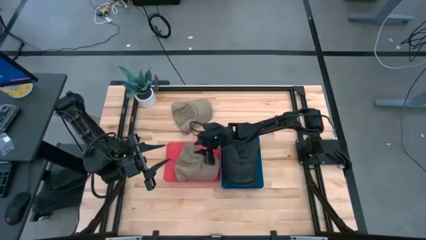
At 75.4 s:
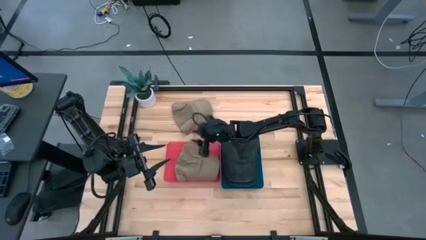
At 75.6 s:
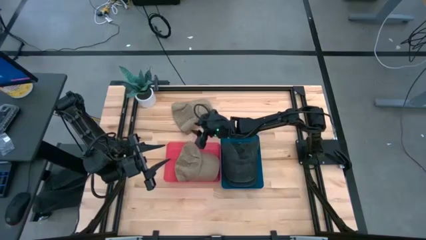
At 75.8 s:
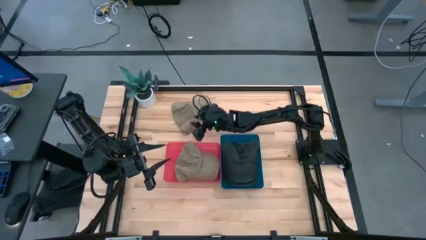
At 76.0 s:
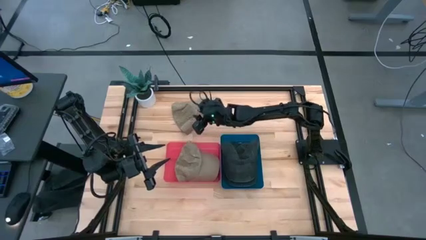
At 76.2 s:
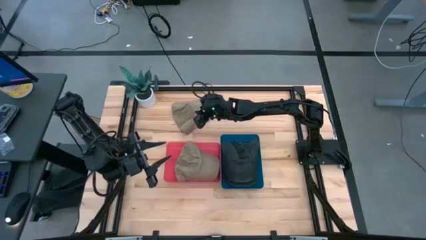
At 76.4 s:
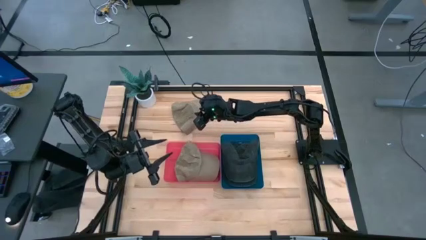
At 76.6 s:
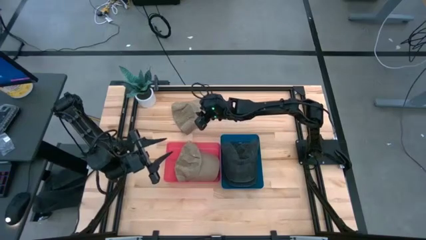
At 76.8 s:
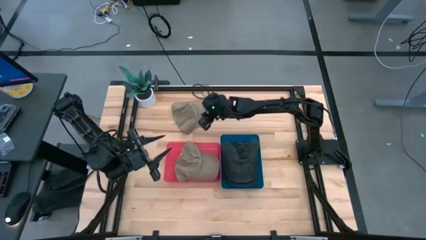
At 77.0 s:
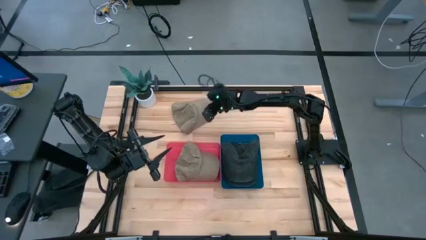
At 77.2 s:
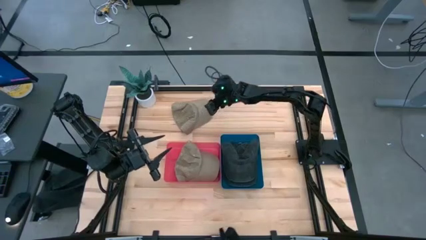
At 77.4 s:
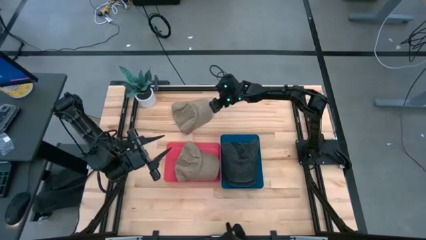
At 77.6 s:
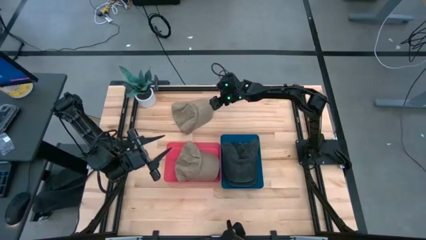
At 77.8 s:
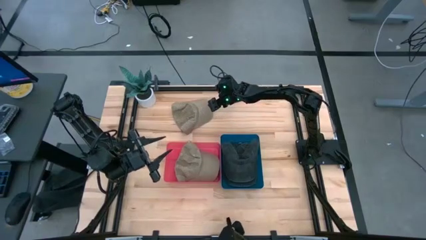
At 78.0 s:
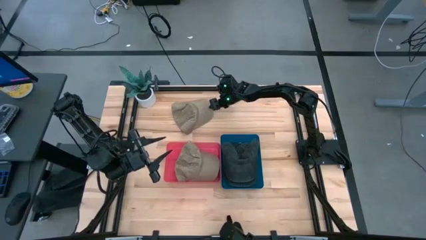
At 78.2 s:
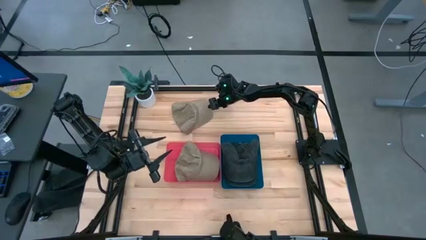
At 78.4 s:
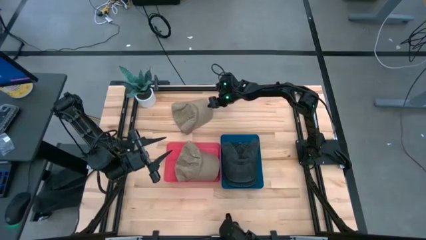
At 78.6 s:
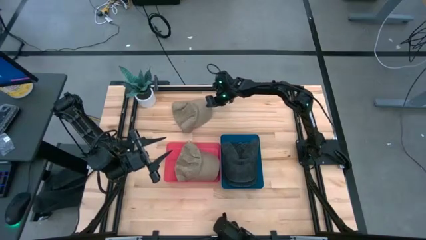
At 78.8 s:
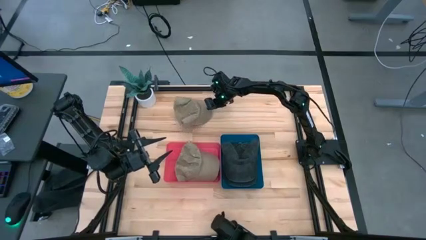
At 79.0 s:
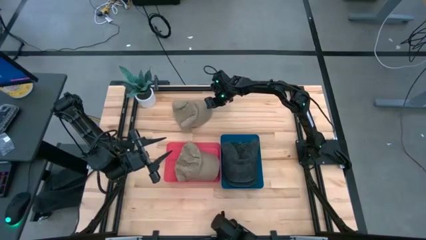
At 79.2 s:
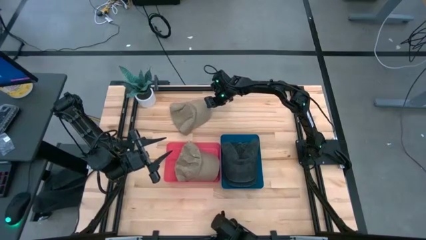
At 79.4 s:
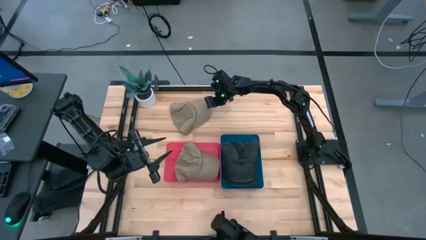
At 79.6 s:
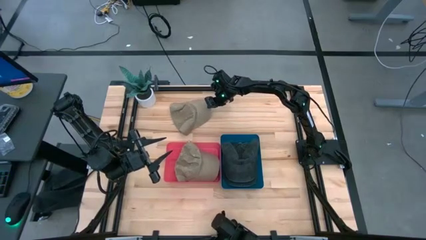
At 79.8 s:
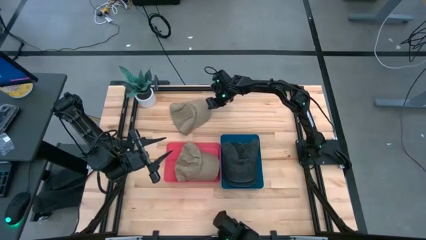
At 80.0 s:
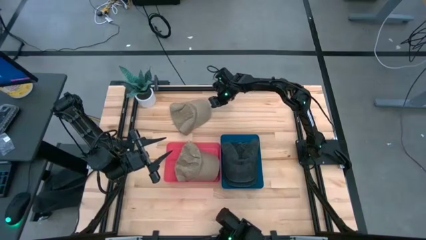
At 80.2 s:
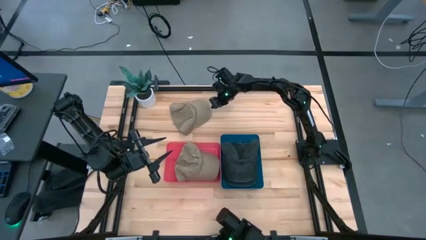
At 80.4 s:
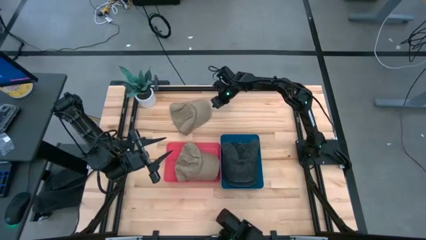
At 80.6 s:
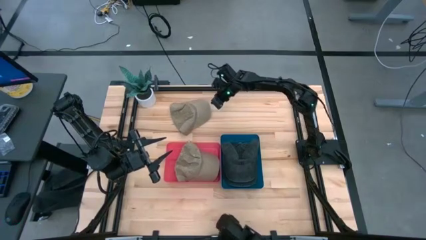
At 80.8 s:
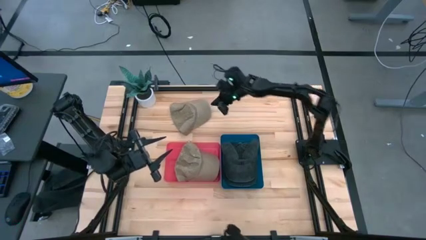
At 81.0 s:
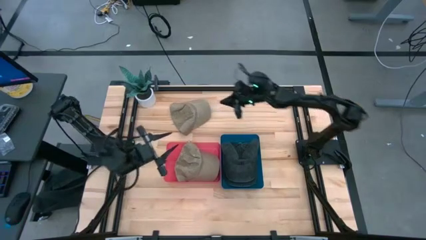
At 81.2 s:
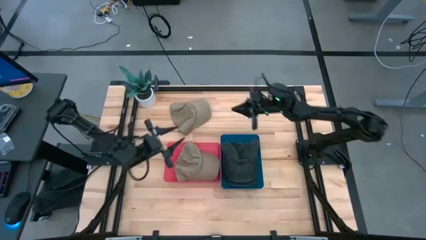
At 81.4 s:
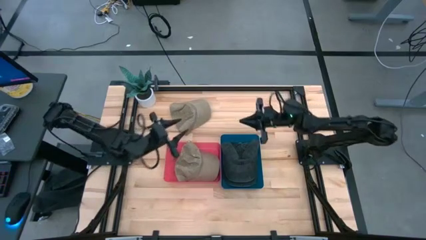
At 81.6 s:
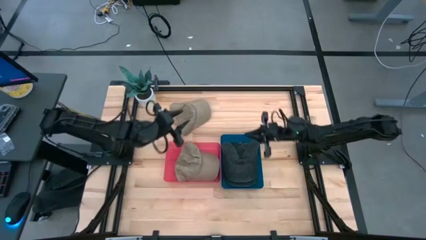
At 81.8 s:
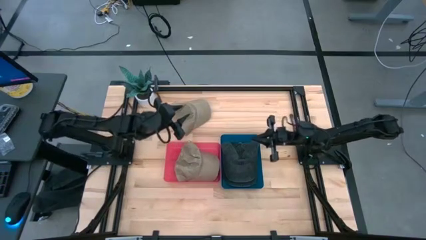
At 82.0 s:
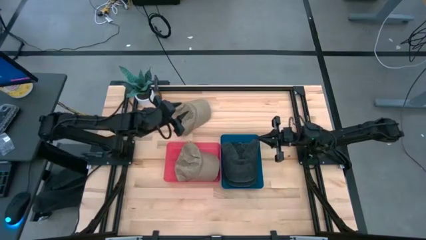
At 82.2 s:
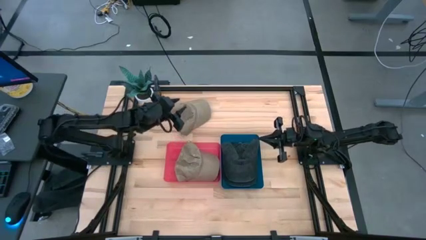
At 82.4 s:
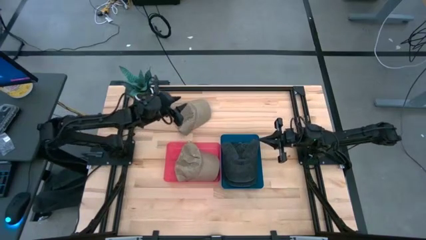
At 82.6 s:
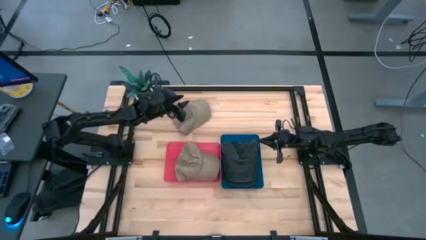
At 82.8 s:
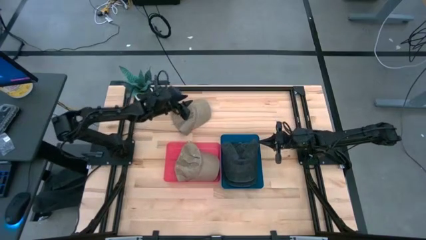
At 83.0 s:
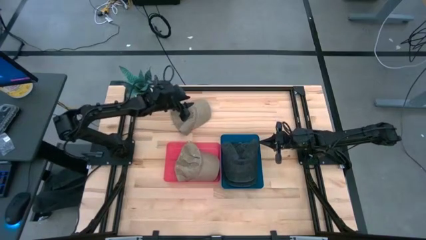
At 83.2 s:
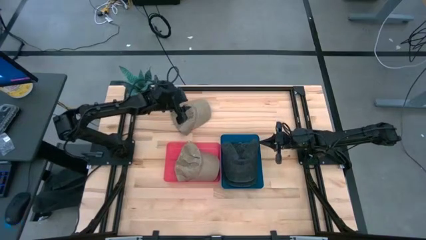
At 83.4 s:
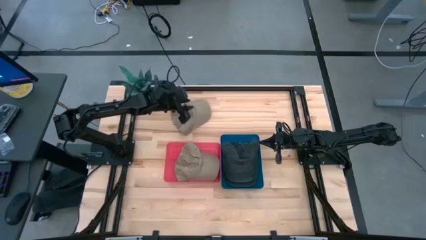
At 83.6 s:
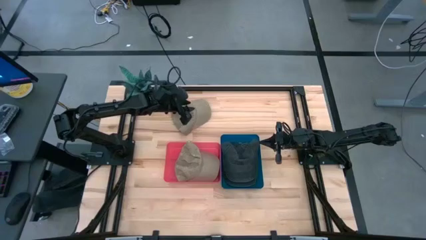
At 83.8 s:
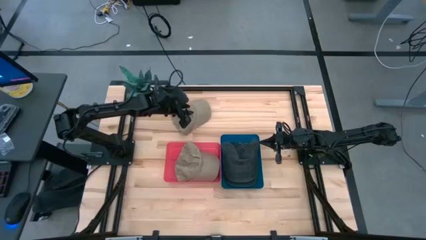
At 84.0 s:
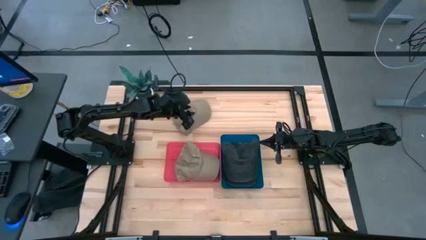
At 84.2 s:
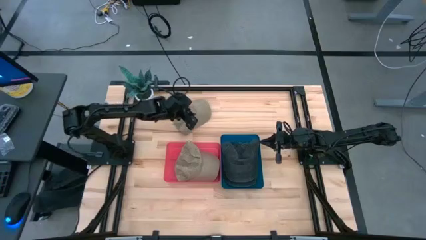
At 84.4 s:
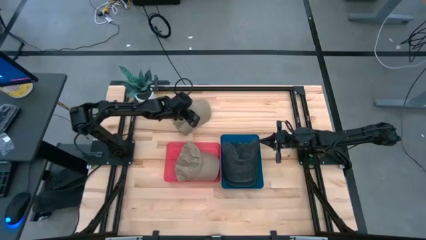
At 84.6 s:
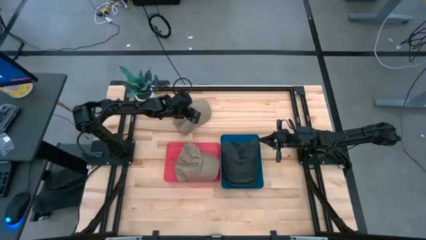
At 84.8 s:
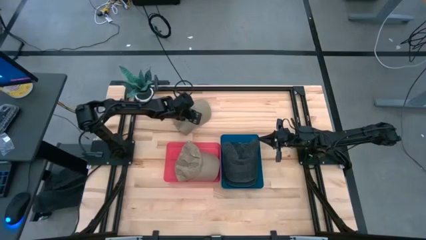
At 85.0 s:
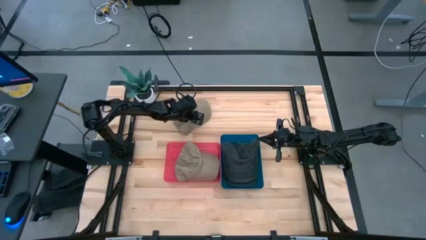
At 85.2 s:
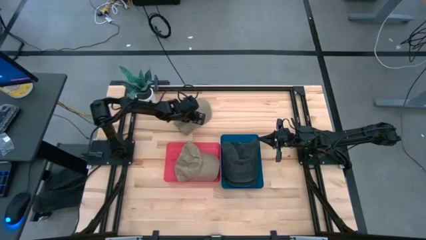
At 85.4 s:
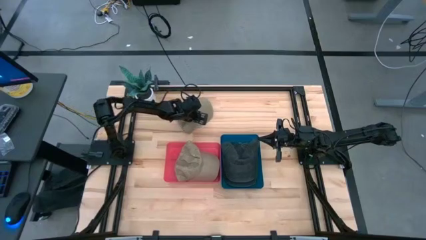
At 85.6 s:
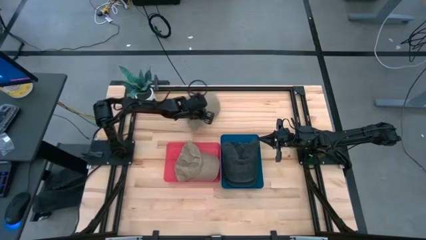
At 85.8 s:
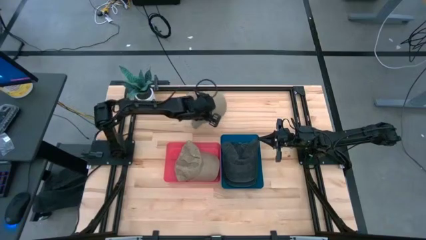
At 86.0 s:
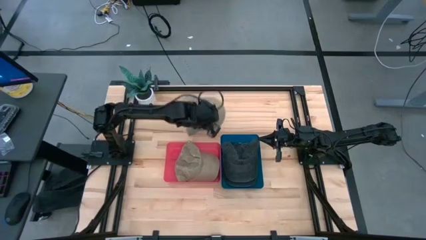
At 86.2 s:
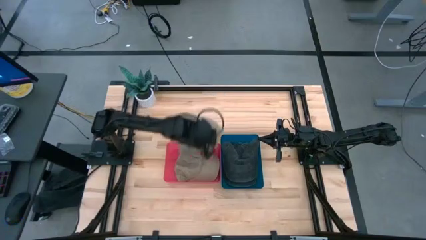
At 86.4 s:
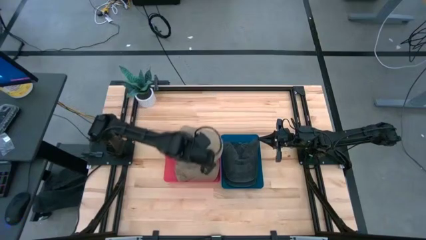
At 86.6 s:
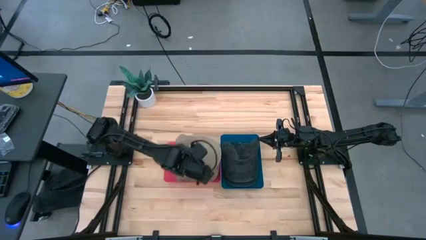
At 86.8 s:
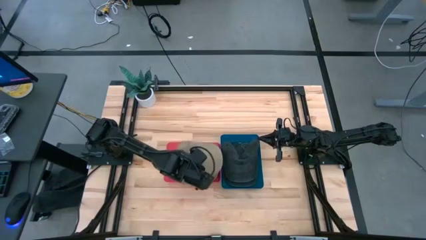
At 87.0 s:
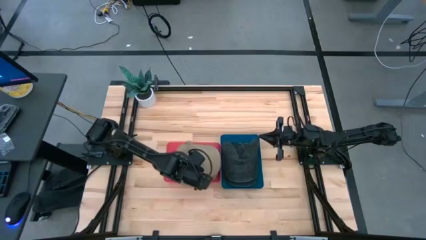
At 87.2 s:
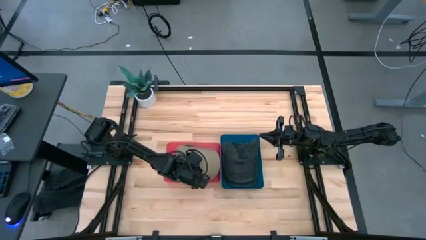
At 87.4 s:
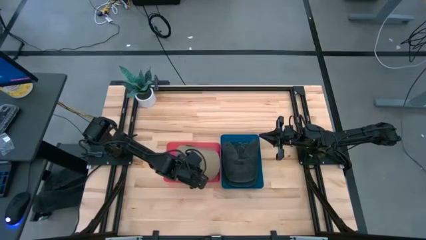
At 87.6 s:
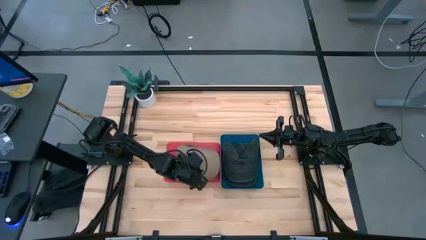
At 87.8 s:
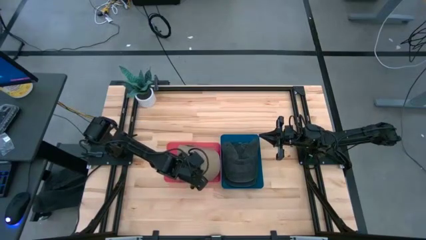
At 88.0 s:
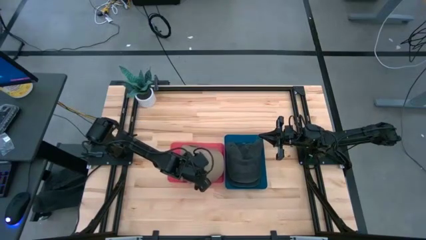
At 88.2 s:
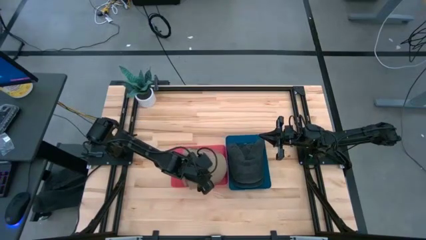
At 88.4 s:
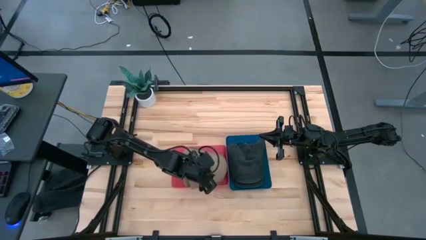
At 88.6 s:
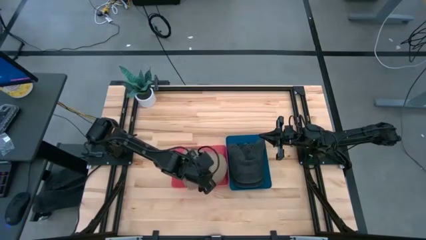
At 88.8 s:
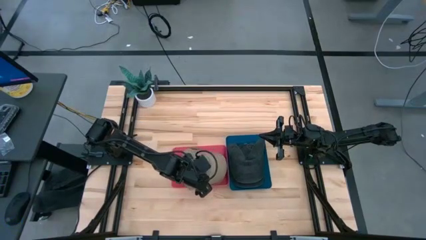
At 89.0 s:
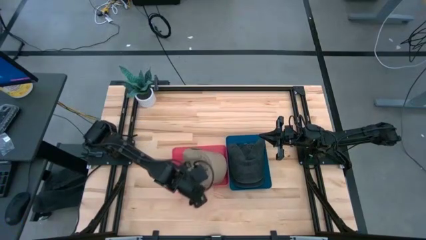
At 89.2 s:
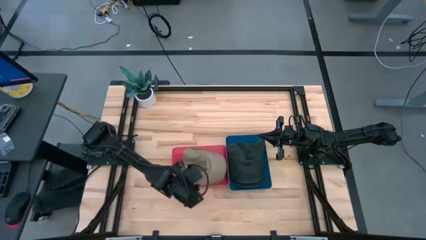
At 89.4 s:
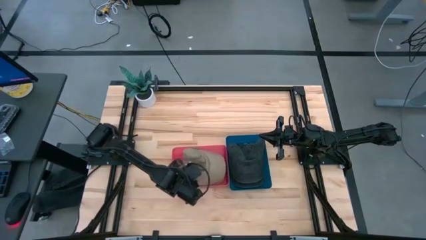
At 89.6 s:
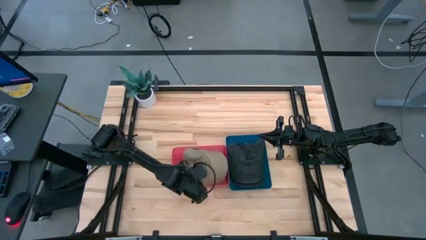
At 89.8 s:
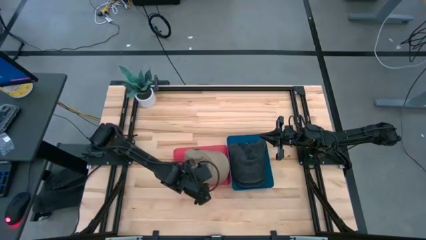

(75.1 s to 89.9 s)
Task: Pick & Place hat
Put the brown cap into the red bin
